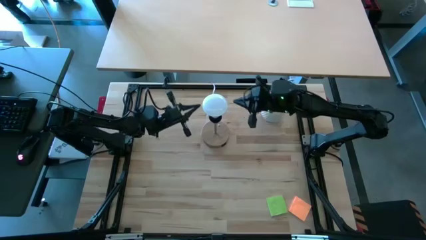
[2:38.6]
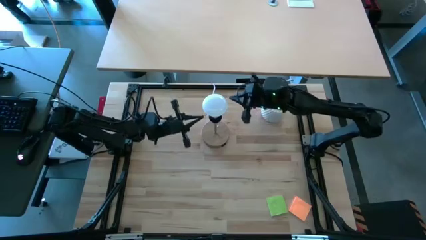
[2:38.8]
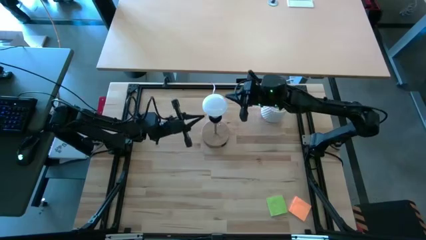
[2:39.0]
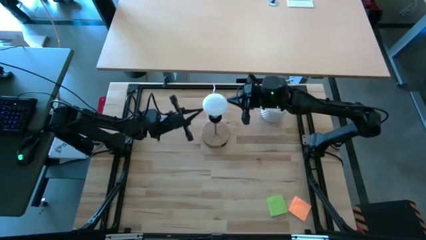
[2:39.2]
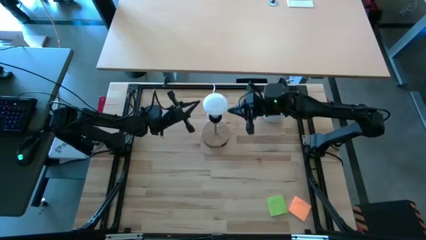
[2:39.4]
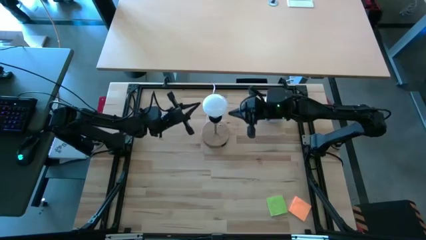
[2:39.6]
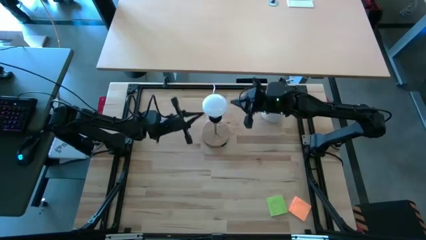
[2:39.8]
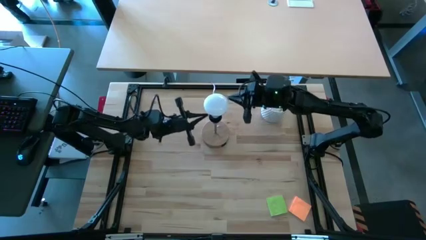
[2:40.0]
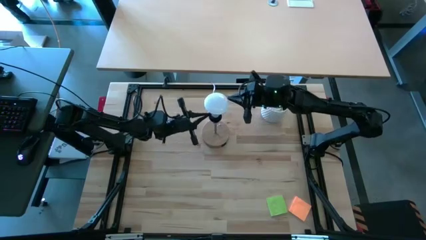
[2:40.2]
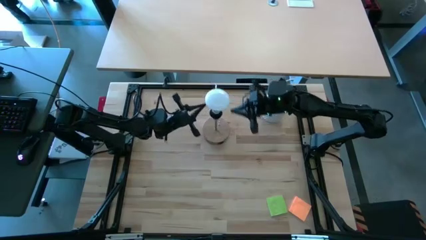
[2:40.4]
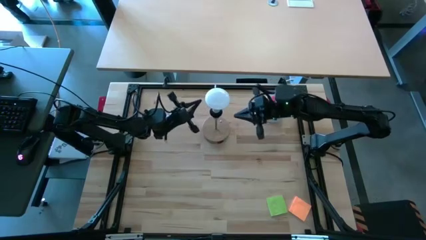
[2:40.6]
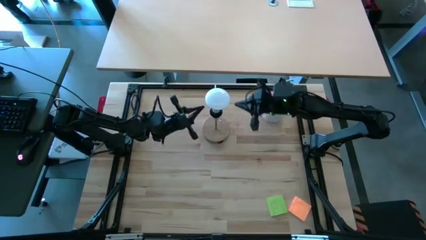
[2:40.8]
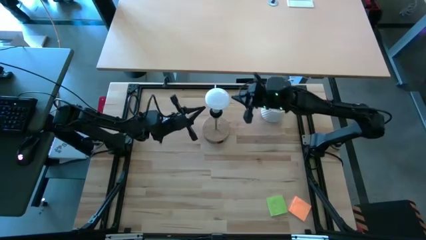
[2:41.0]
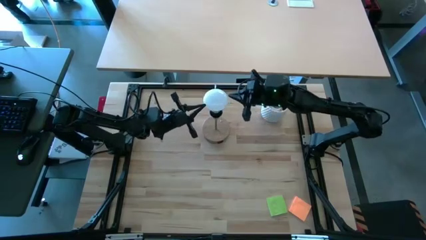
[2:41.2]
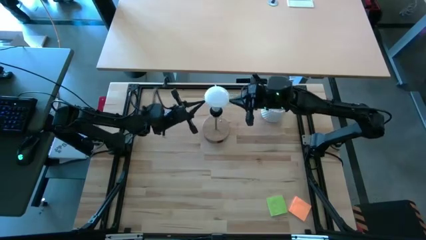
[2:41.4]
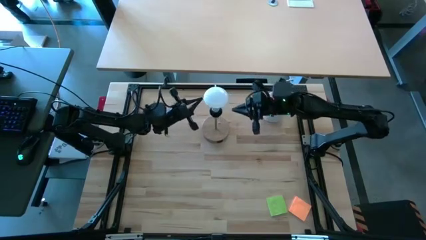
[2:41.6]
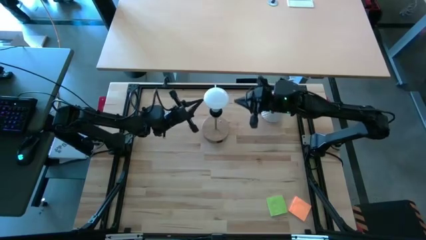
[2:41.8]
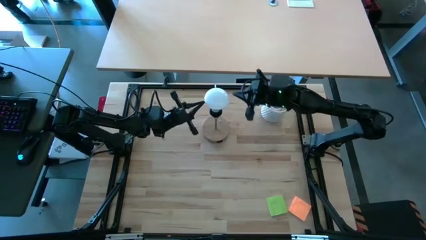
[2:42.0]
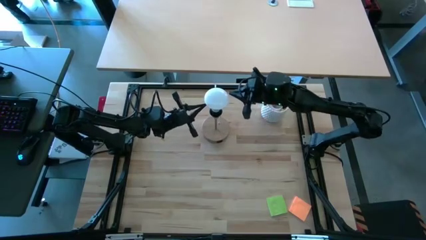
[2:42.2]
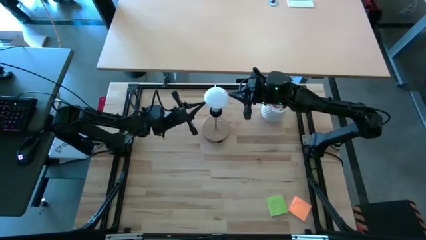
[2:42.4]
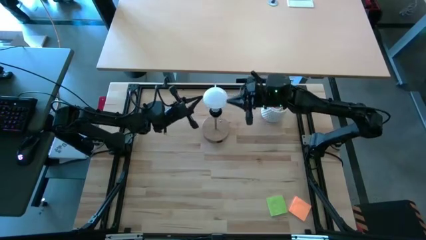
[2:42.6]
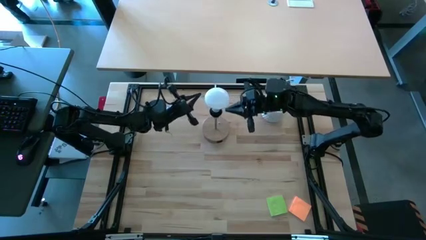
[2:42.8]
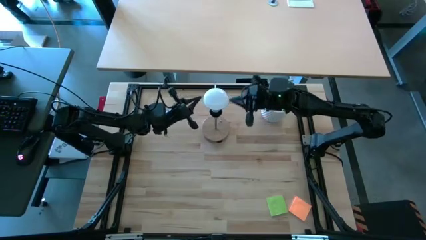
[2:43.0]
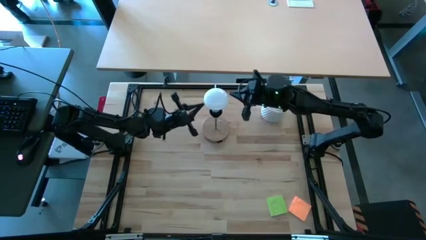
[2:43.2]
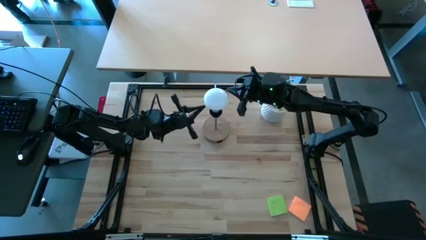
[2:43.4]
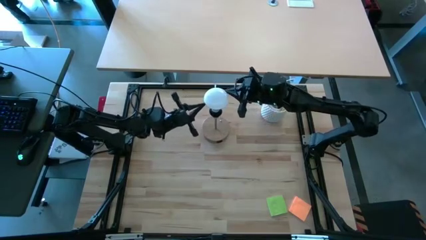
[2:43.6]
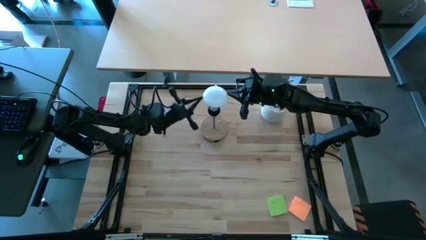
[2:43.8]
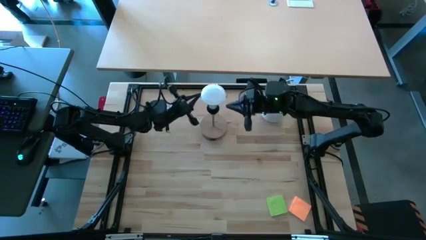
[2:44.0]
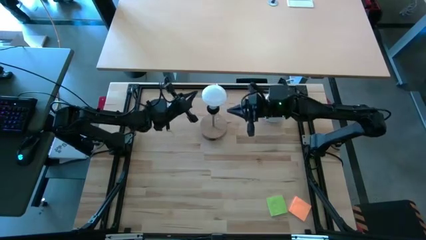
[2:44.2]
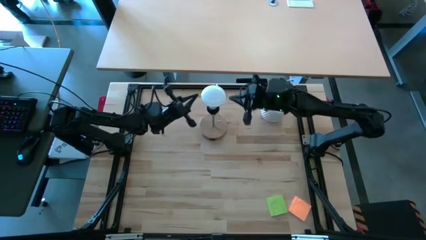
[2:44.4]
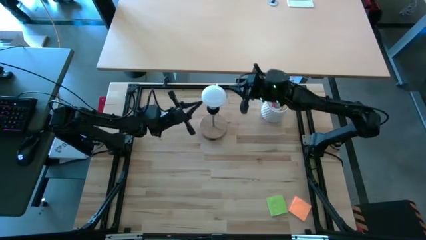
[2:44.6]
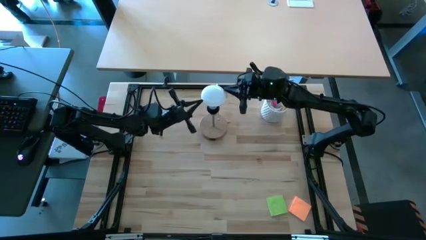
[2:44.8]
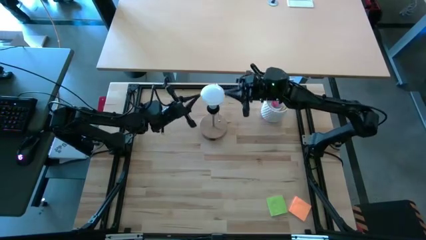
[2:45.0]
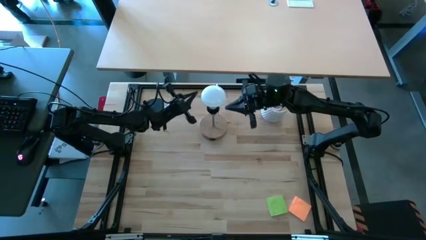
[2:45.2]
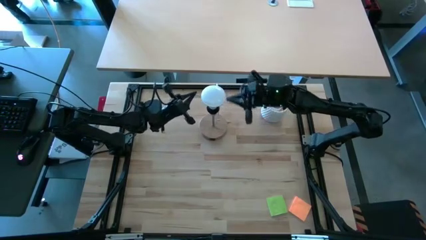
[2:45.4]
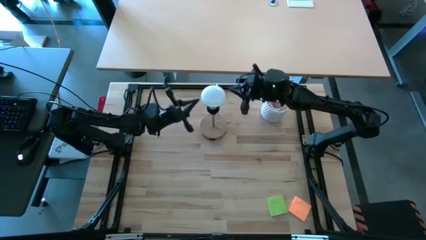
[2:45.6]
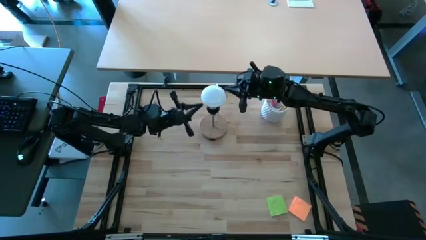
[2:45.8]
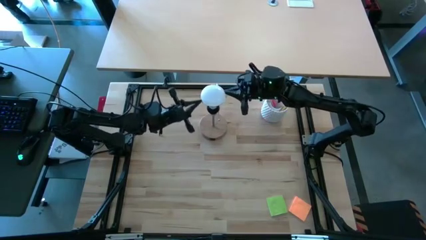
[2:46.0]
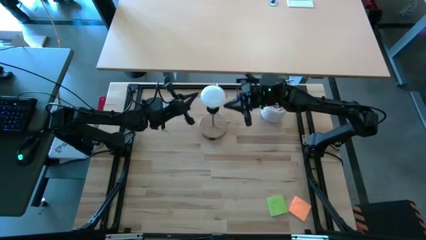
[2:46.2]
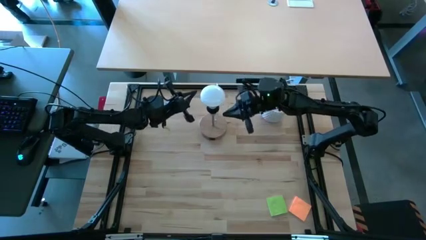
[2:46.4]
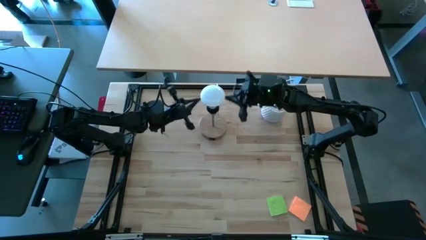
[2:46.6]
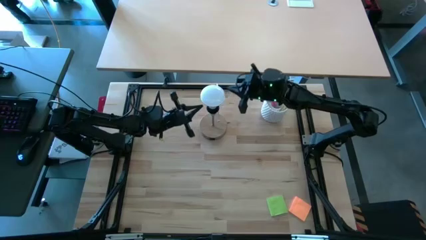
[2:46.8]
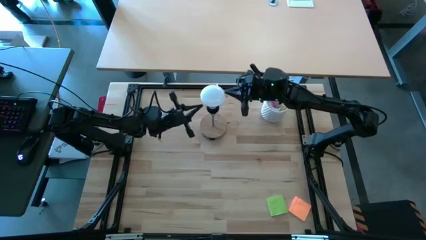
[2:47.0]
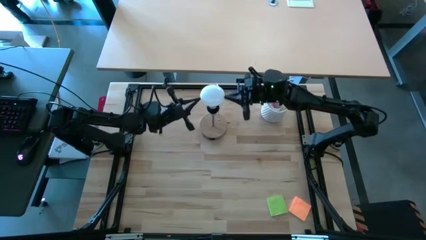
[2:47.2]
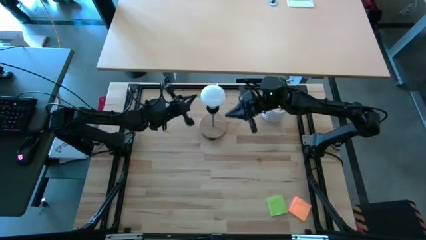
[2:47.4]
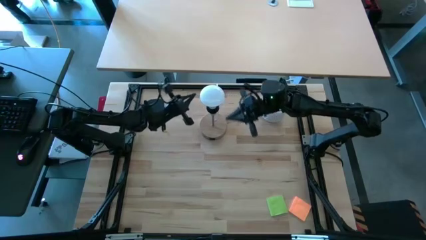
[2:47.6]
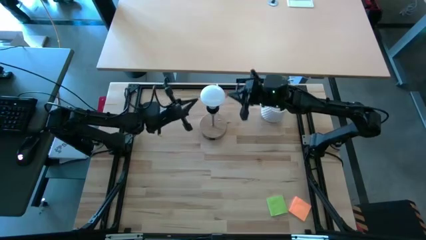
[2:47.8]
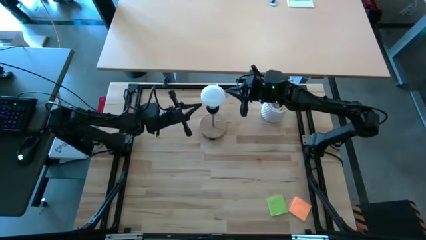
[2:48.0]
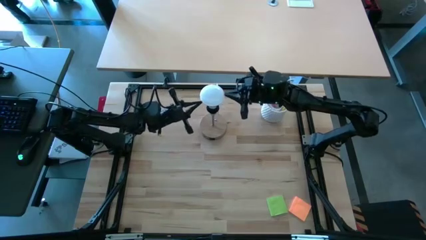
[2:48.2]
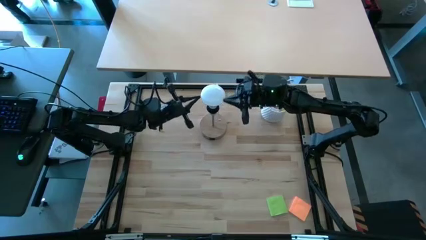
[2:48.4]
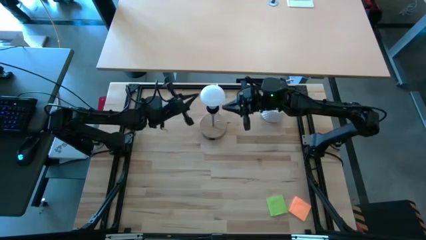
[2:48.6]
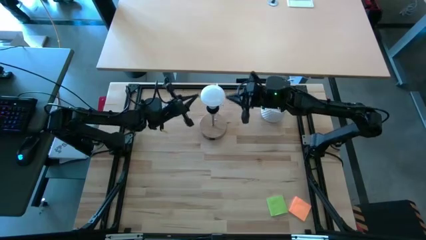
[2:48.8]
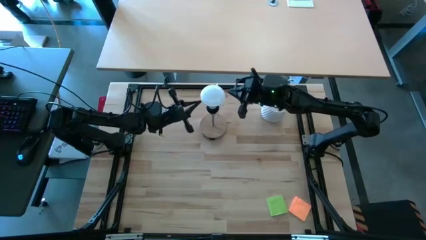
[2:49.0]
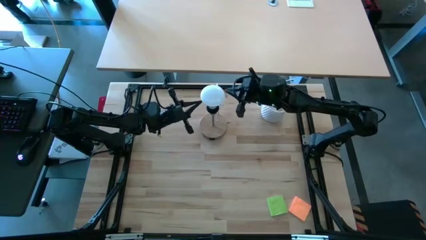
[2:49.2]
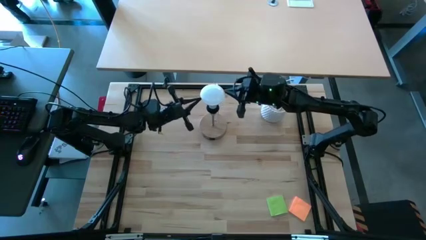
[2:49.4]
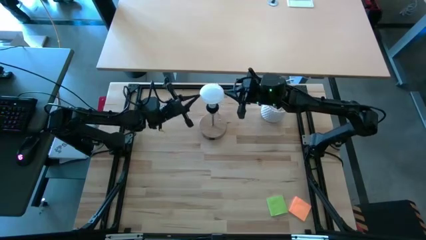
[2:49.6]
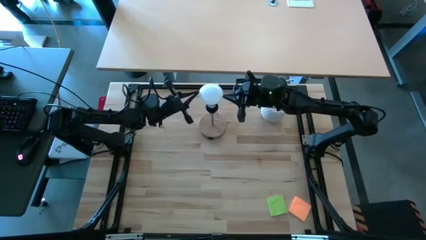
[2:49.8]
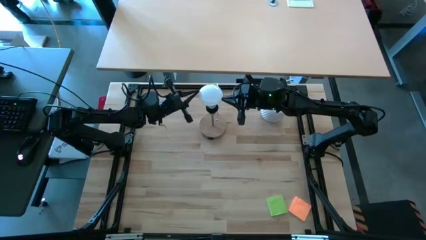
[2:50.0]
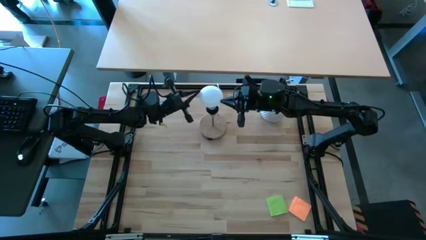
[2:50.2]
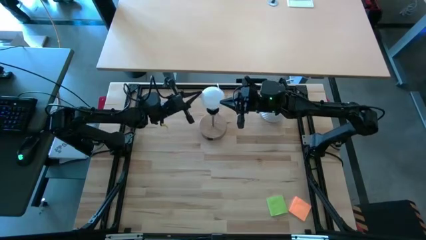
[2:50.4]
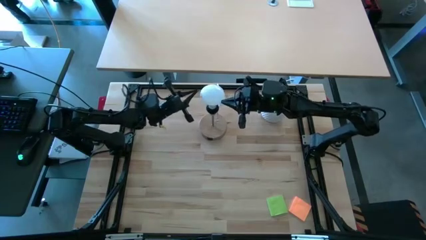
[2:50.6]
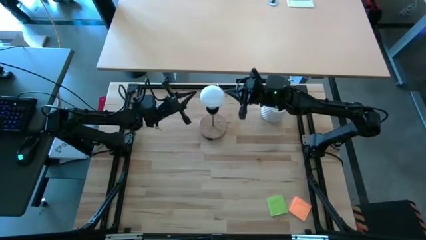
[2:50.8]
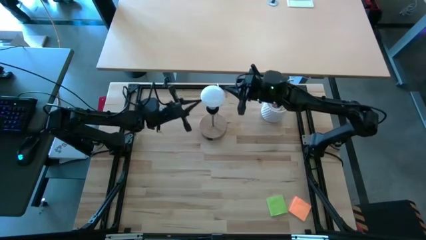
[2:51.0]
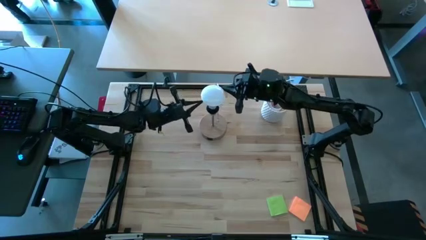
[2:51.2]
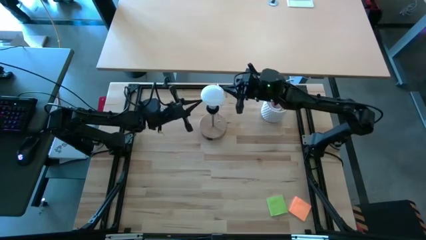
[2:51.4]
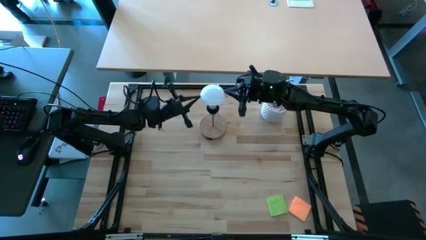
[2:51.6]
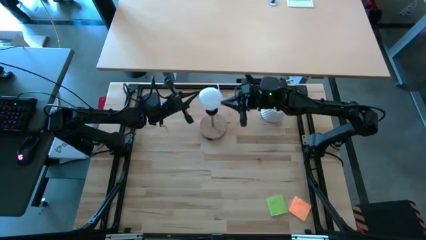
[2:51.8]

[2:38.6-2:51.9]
Task: Screw lightbulb
Insert the lightbulb into the lamp

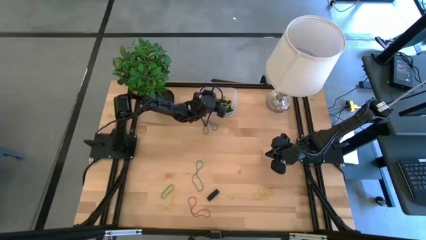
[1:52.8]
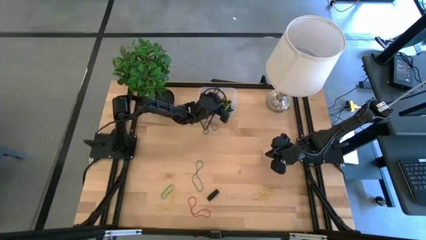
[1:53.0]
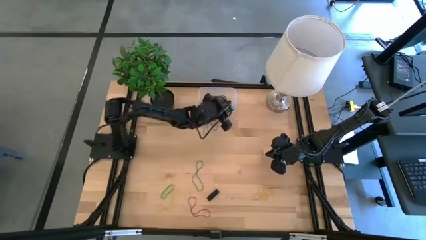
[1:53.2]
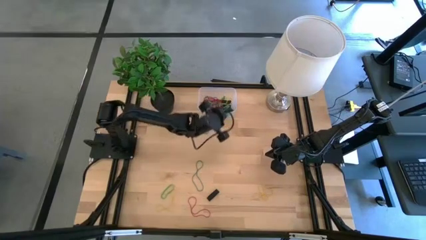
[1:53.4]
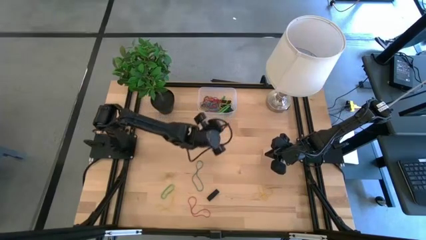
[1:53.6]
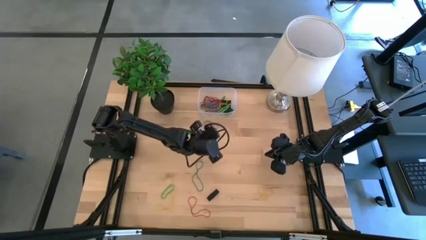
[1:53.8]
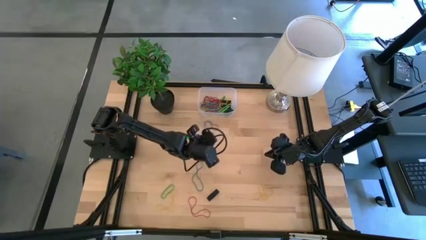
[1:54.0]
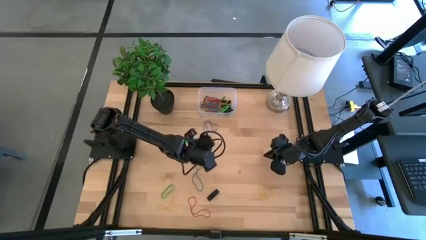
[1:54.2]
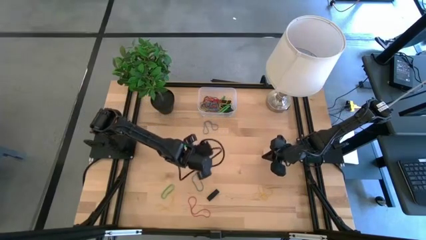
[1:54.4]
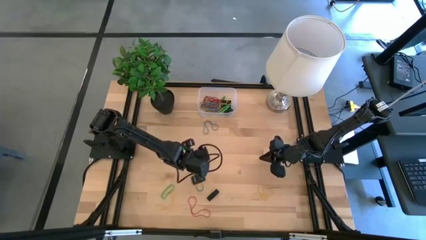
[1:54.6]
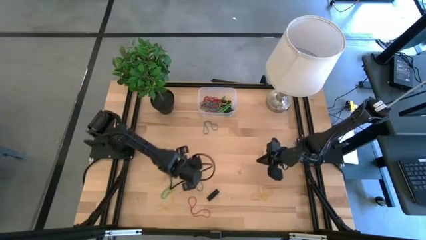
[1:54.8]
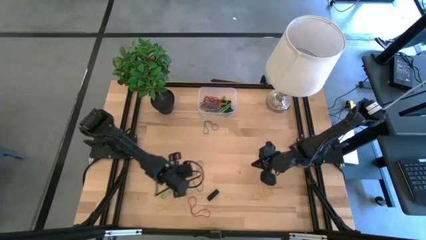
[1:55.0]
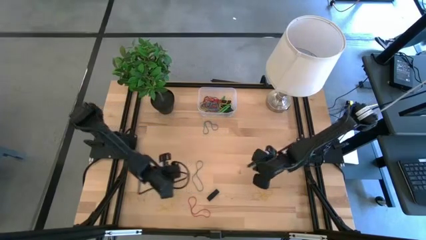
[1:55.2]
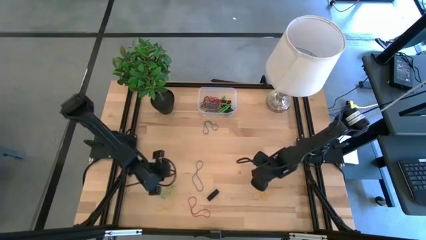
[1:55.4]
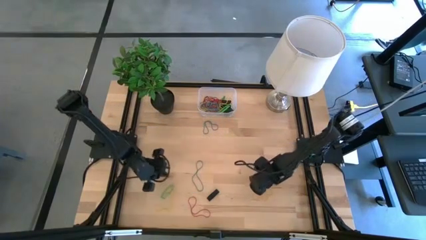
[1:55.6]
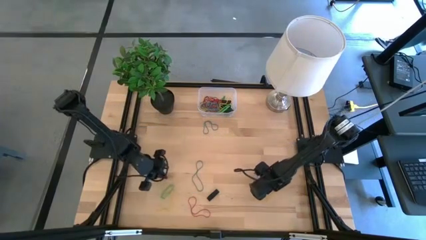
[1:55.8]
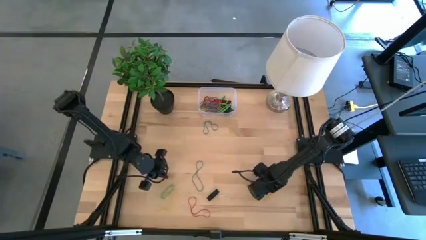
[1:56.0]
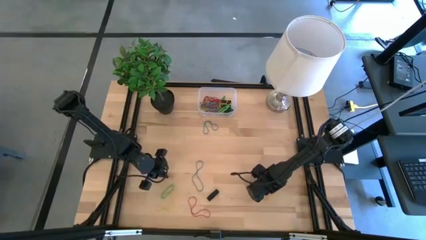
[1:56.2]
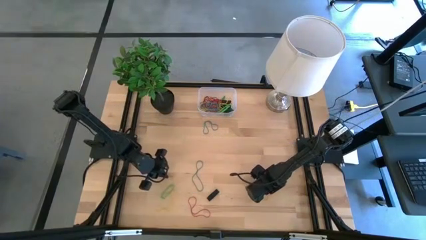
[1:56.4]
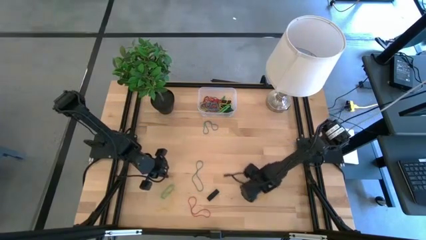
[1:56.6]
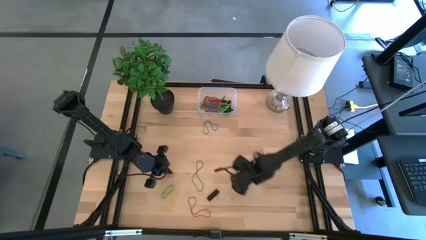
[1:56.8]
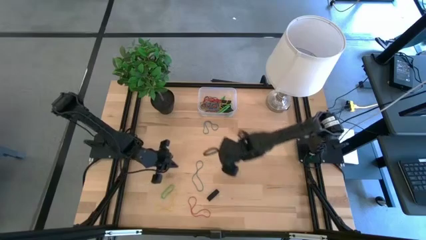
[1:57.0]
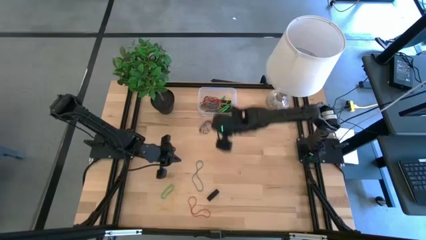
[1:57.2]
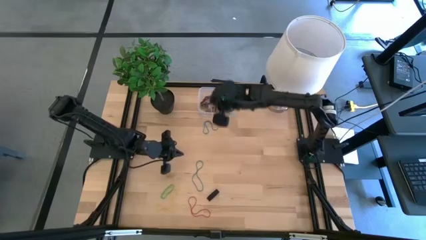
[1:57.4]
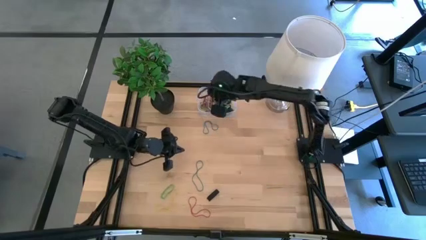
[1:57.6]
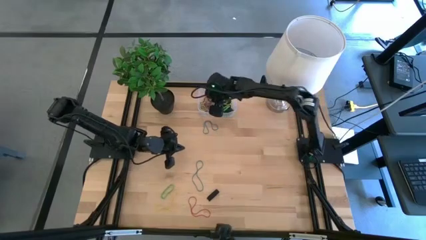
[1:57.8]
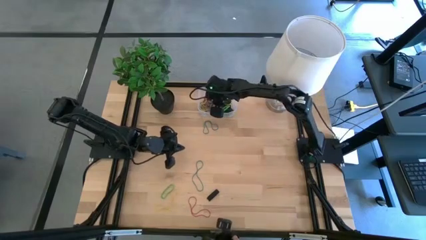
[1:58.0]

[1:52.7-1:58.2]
Task: Pick and place rubber bands into bin
Put the yellow rubber band into the transparent bin
